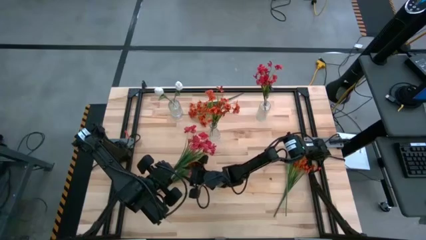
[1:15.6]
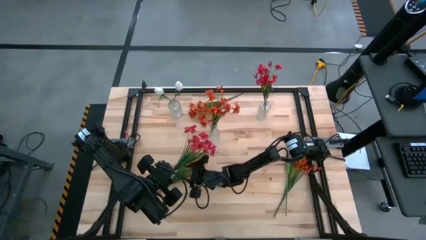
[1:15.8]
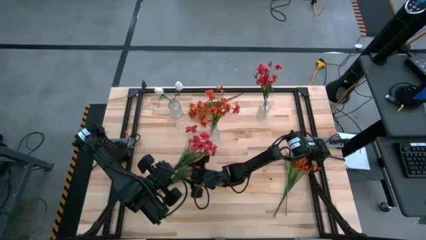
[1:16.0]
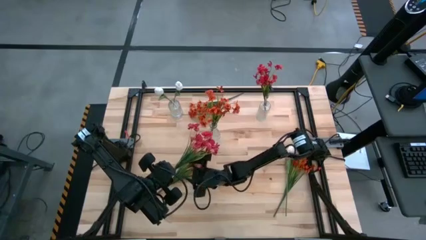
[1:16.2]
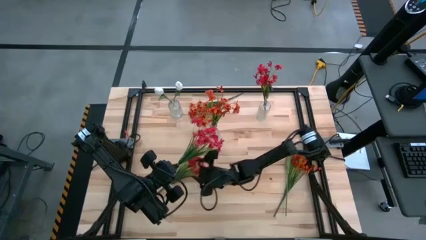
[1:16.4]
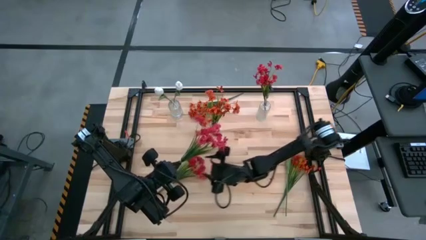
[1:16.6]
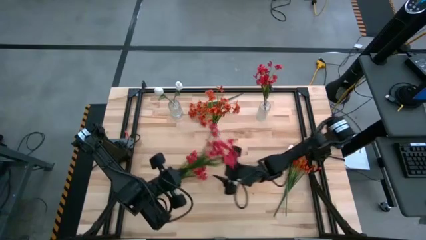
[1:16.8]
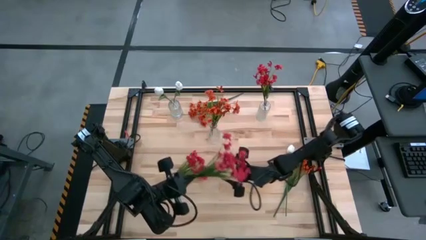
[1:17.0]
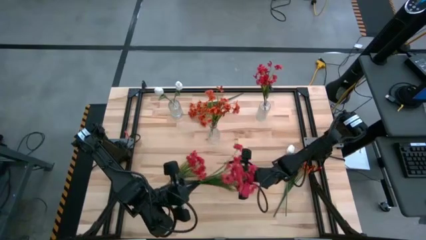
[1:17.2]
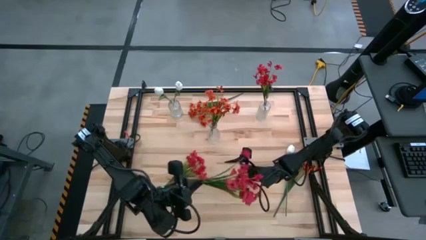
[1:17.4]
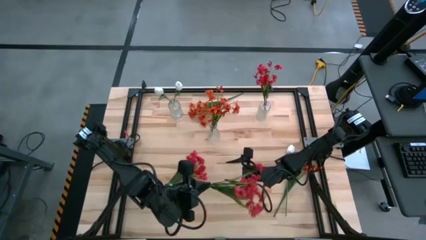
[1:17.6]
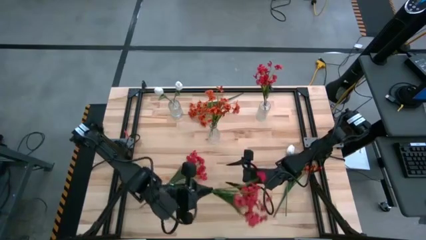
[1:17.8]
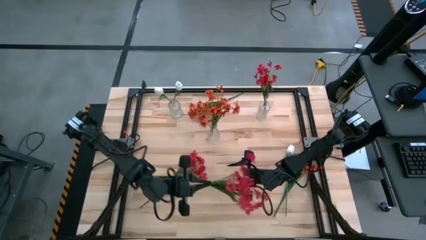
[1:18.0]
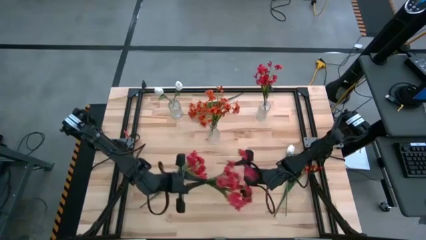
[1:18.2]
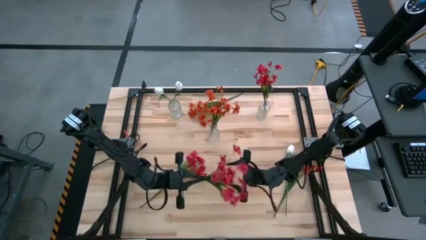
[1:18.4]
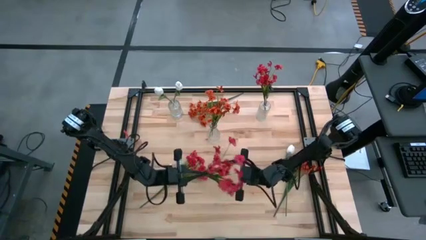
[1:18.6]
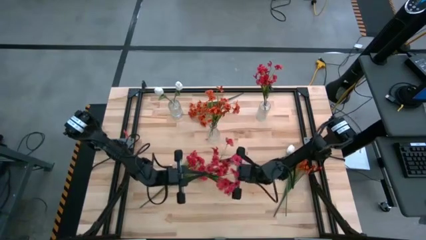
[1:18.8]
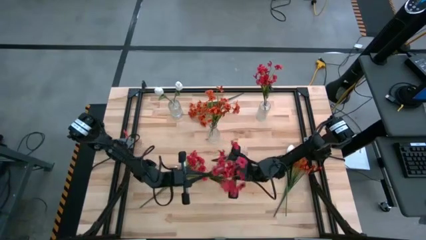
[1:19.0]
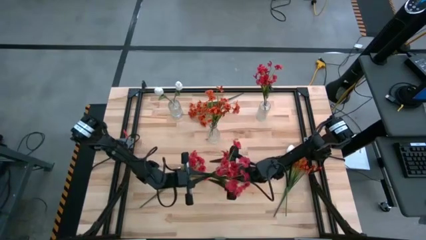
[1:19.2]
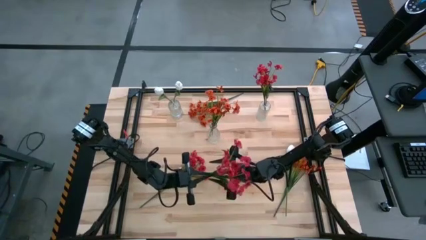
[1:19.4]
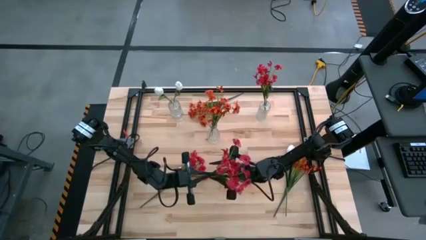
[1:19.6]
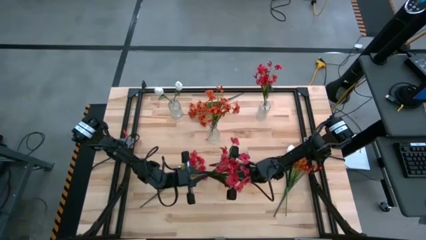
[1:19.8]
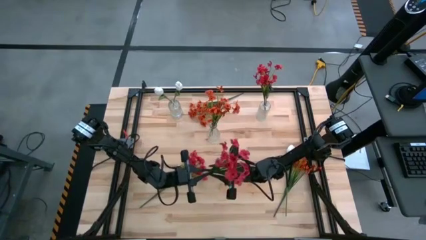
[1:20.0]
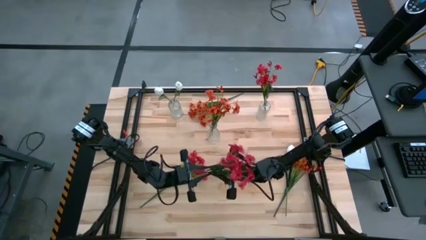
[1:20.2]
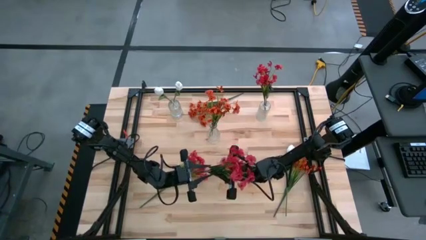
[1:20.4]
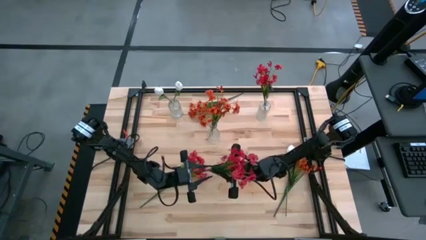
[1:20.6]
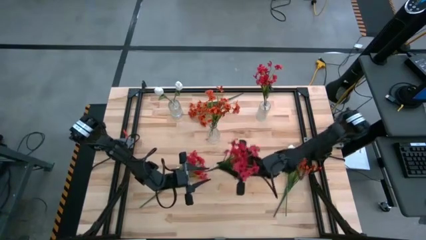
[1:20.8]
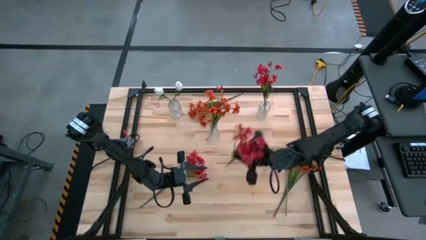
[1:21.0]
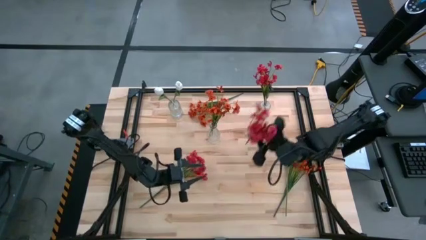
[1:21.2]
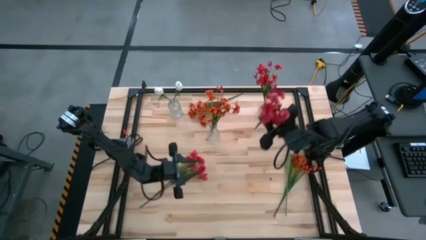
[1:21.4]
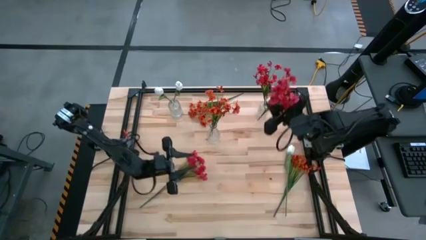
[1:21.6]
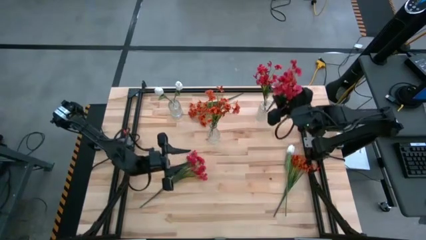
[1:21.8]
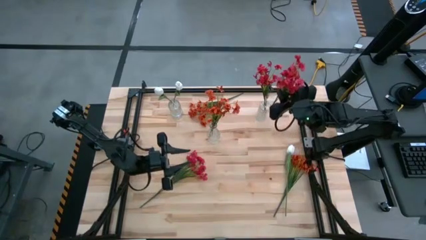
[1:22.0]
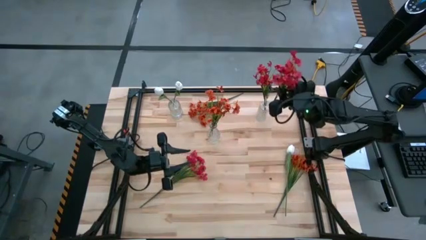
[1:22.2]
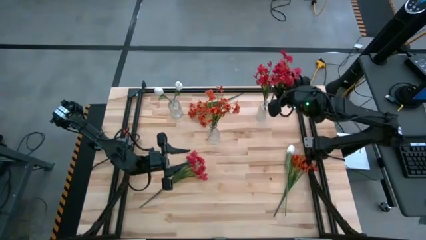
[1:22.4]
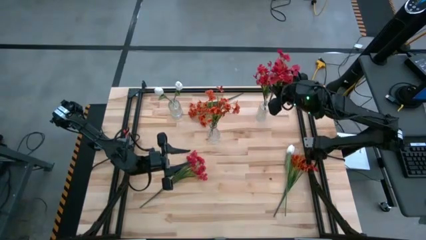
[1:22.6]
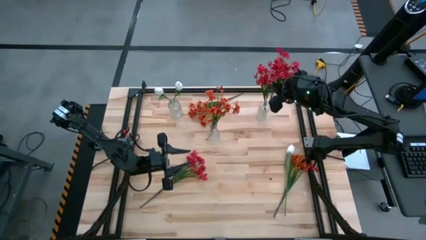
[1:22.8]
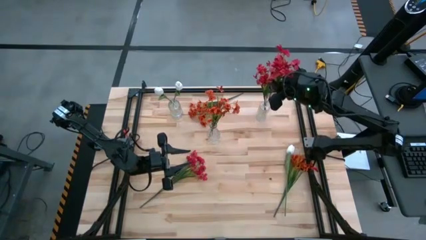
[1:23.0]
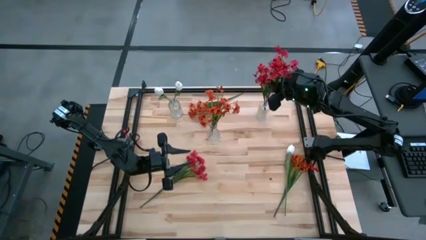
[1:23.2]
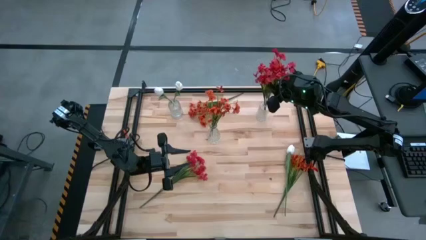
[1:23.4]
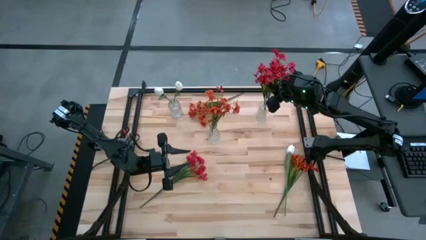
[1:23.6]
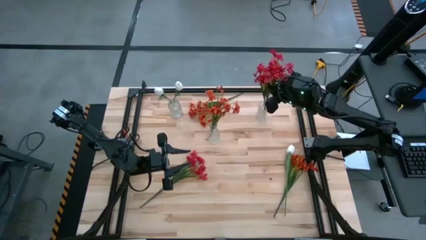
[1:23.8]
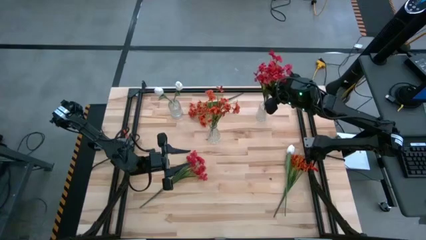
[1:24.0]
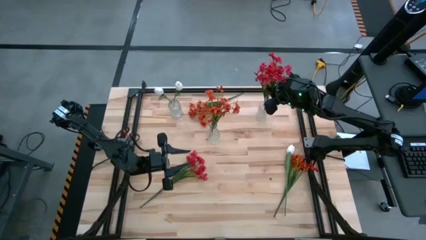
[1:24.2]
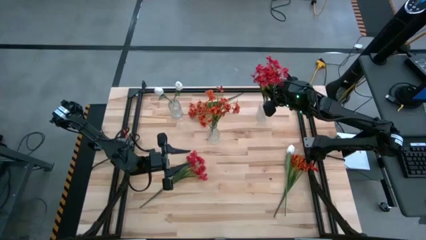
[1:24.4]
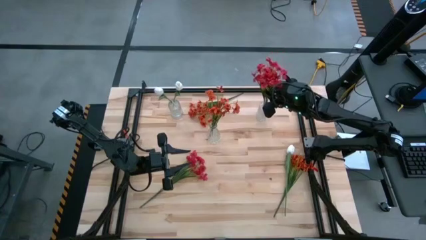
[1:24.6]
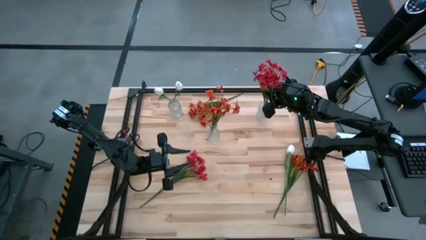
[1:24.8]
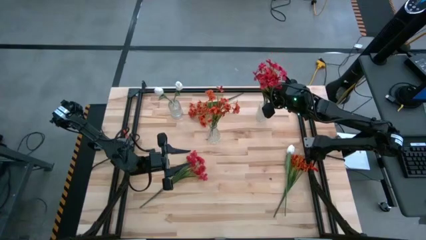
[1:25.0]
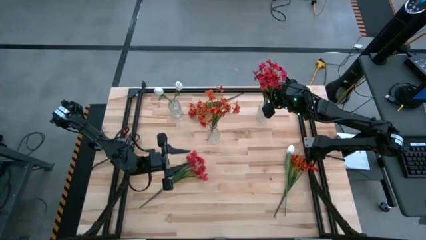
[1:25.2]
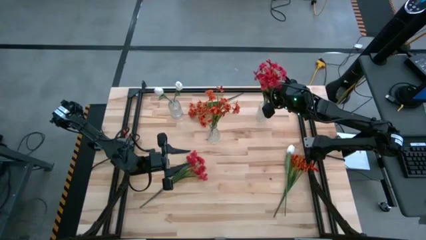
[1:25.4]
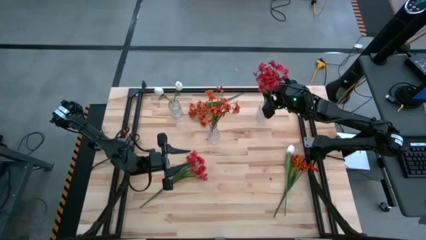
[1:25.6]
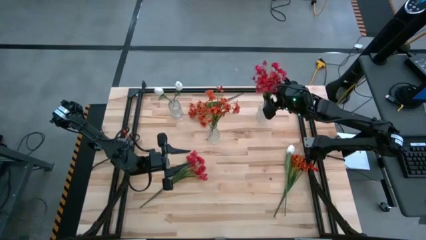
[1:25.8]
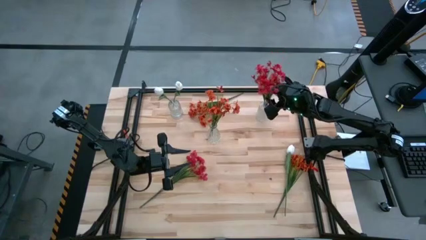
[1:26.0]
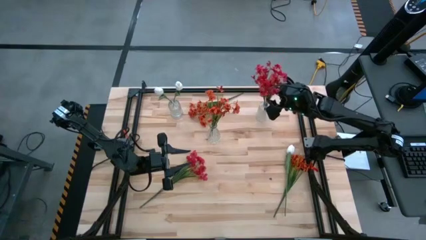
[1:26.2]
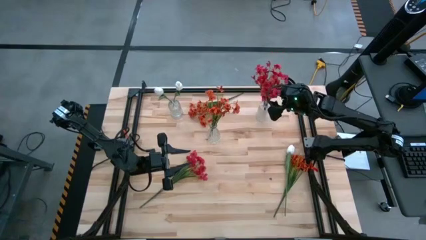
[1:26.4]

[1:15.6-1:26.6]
Task: Sort flowers into vase by color
Put the right red flowers into the top right transparent vase

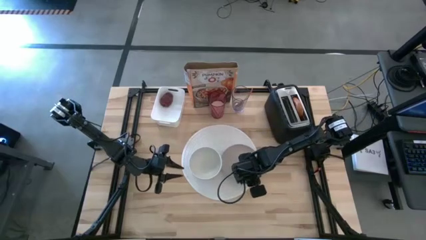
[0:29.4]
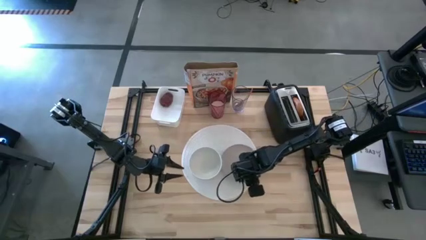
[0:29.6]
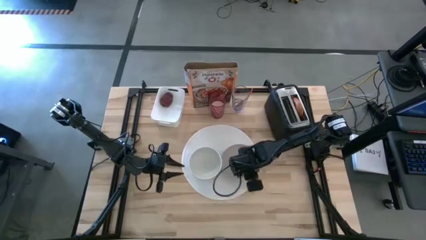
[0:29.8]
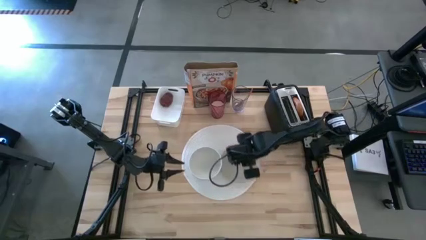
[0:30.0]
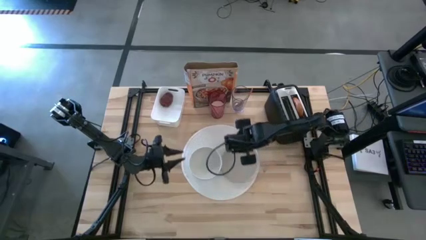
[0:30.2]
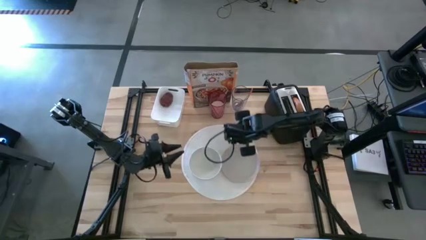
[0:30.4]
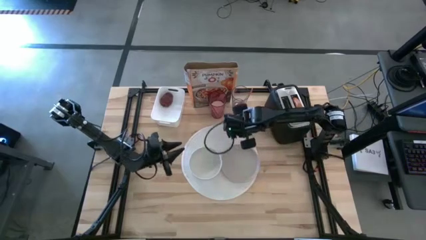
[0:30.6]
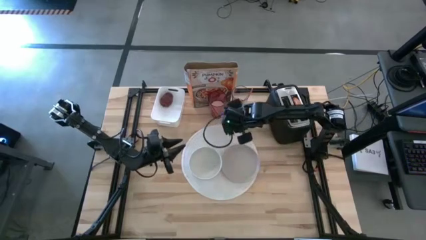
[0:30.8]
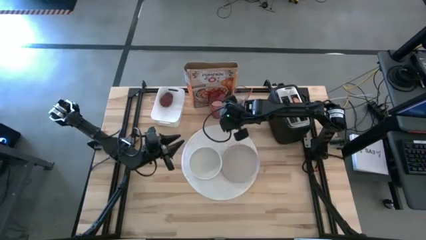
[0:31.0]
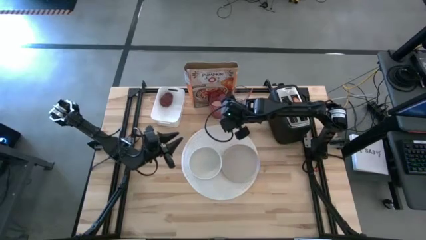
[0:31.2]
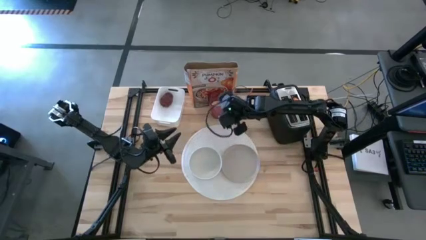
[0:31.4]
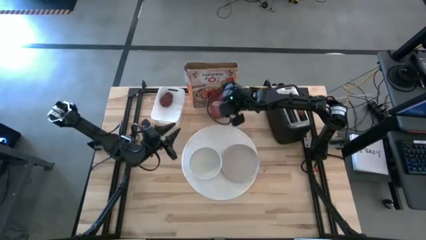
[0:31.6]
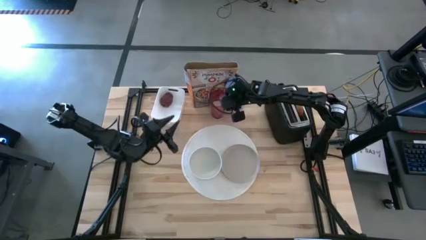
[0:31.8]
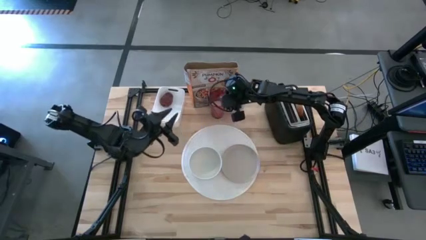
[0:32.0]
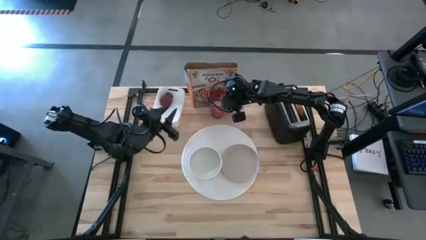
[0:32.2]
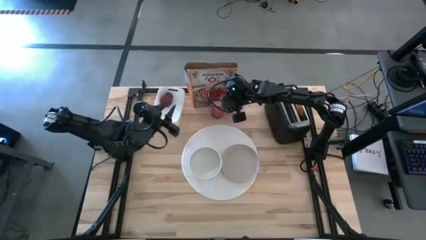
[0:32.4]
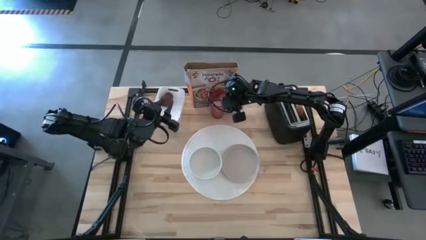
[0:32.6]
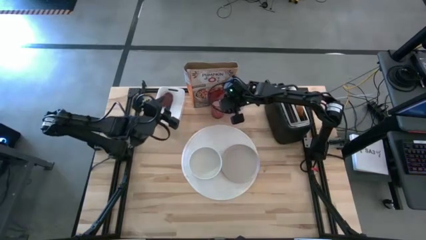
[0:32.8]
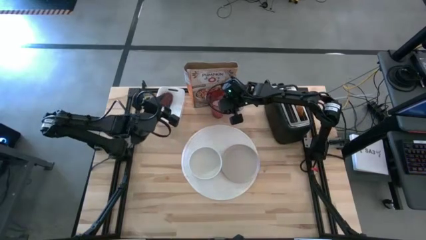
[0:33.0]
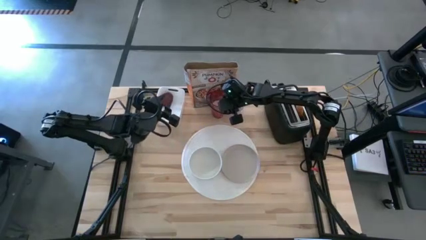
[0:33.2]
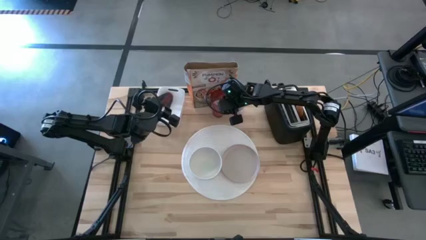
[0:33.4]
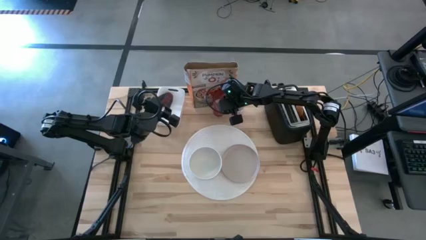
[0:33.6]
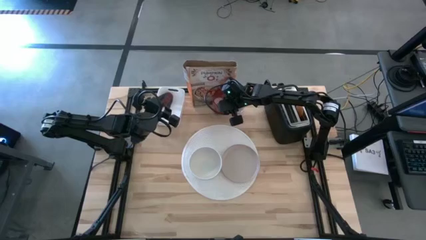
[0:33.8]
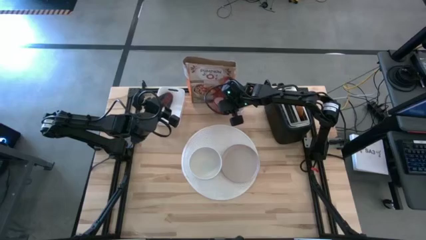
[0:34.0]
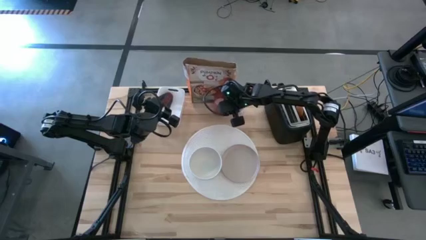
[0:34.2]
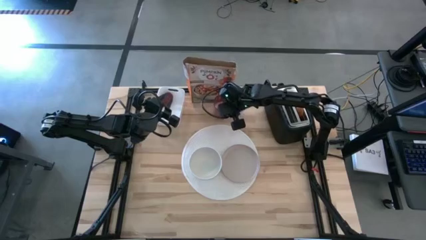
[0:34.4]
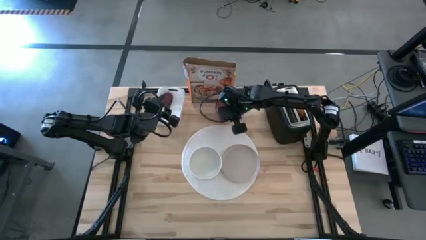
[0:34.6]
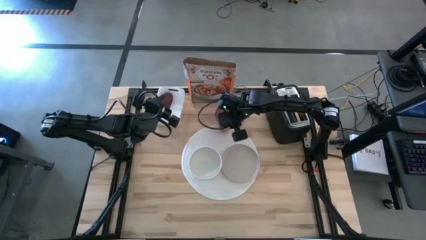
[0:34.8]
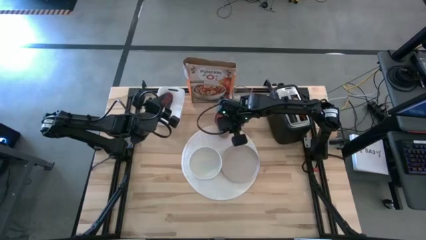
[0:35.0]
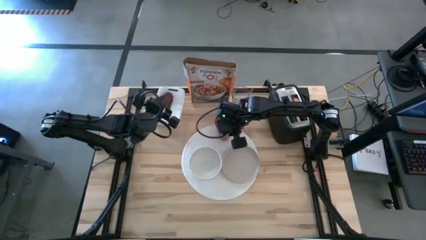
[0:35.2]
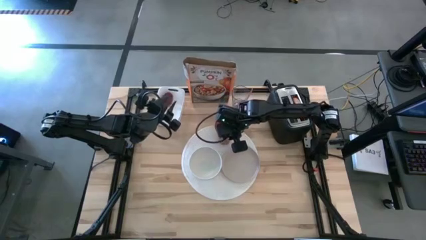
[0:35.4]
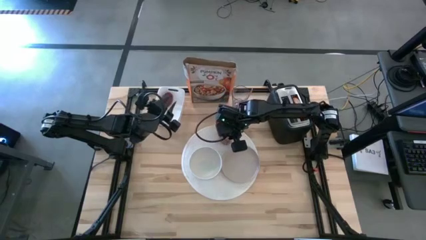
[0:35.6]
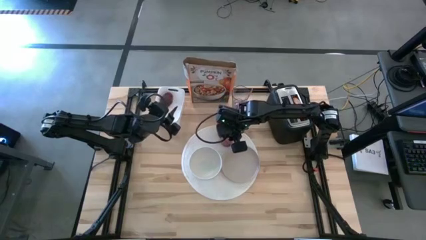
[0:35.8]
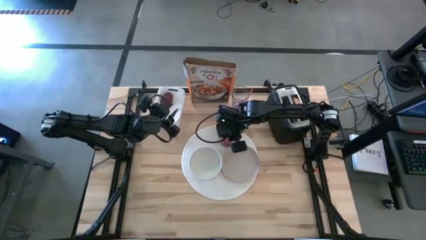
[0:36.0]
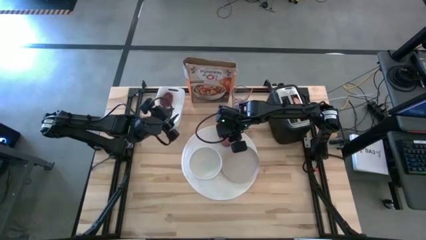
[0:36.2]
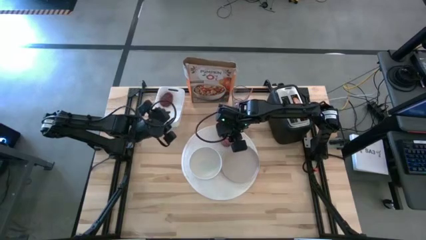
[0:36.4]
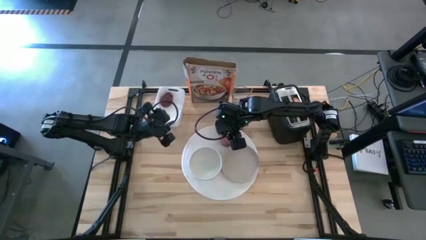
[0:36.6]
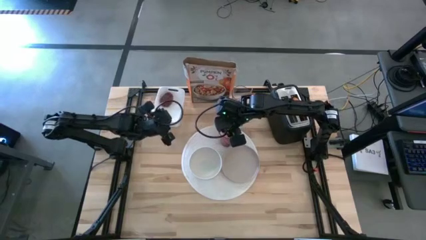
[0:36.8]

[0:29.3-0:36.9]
Task: Arrange a breakfast setting
Put the red cup on the white placemat above the gray plate
